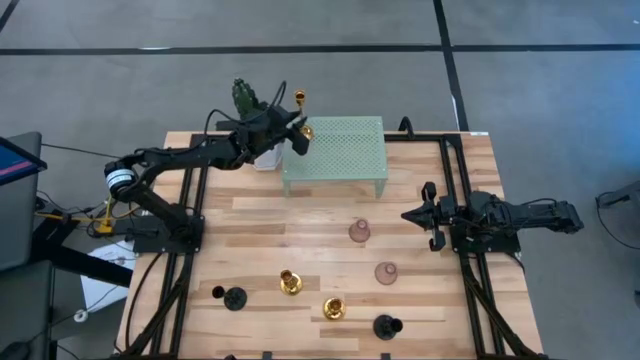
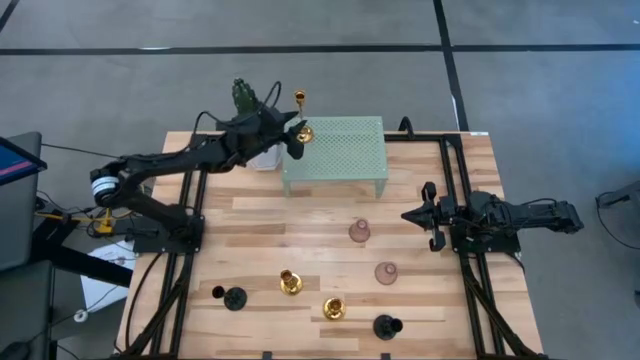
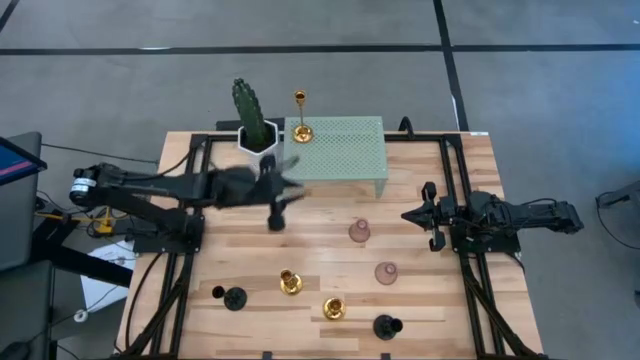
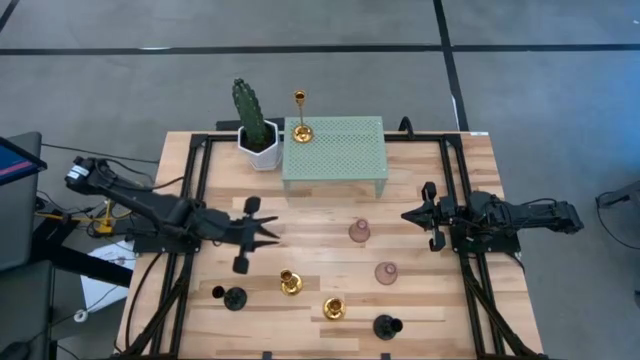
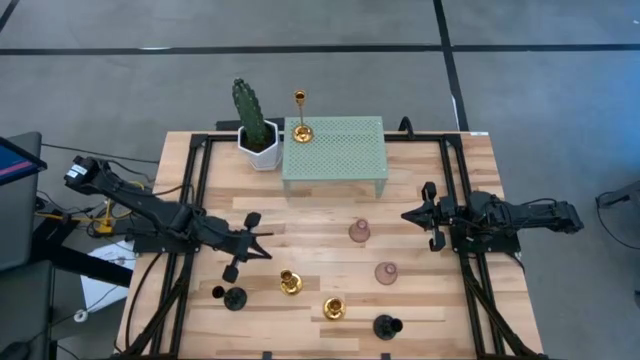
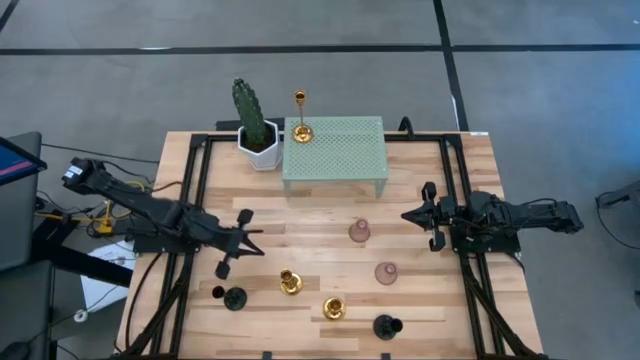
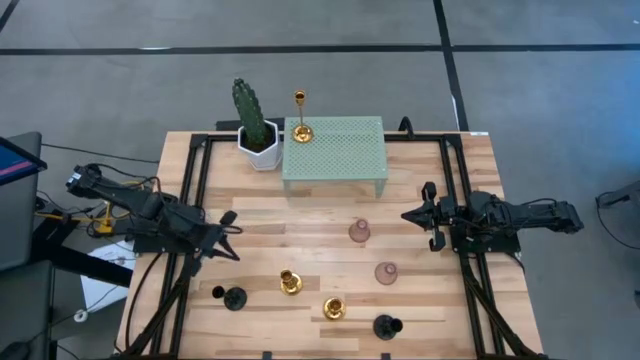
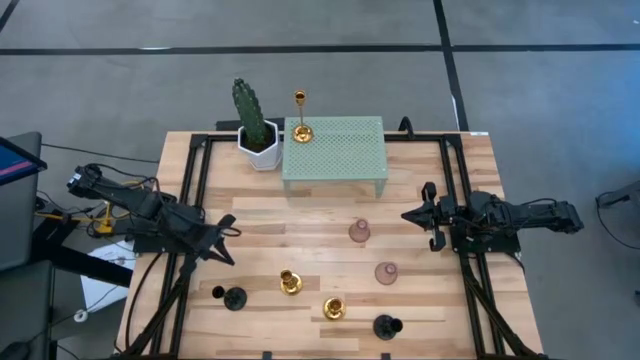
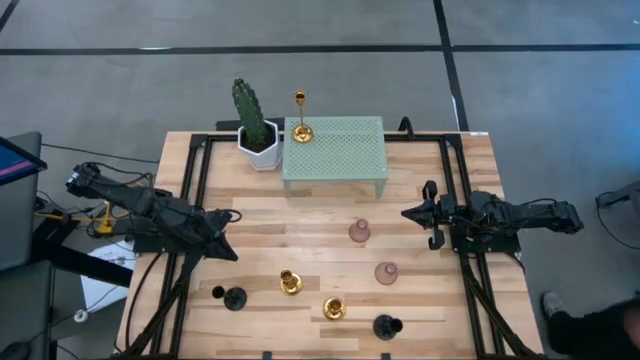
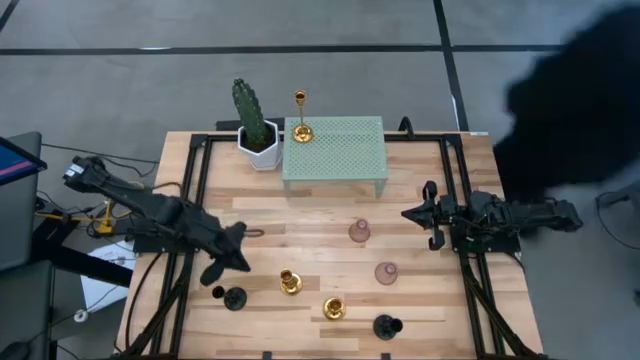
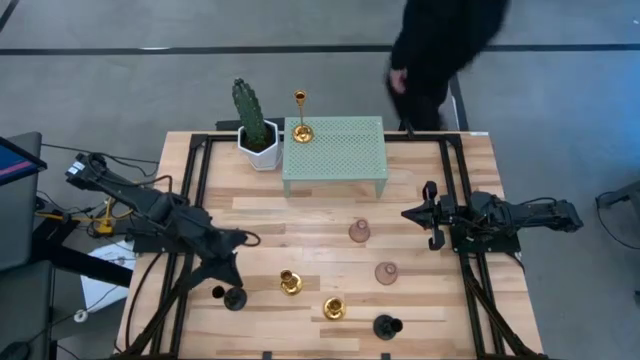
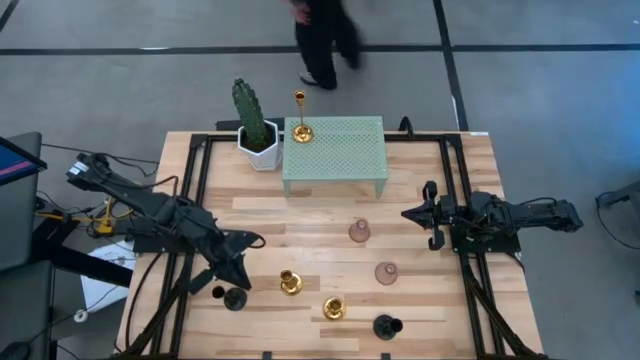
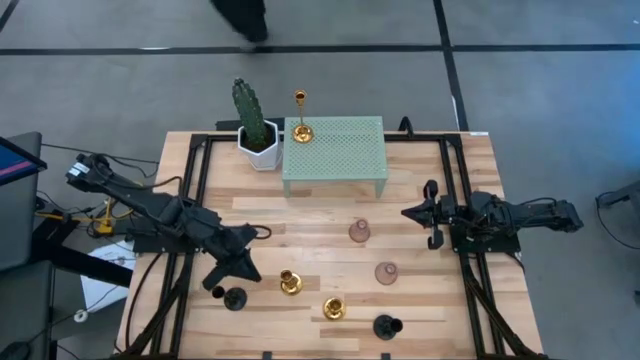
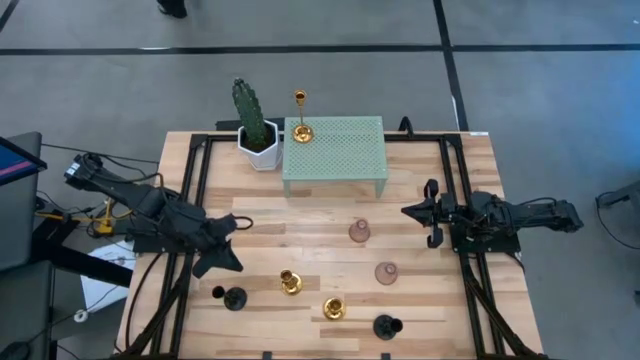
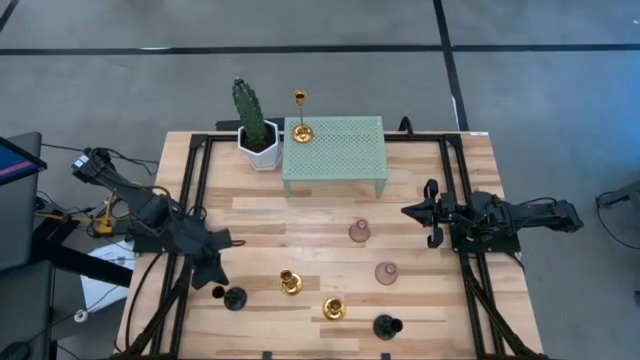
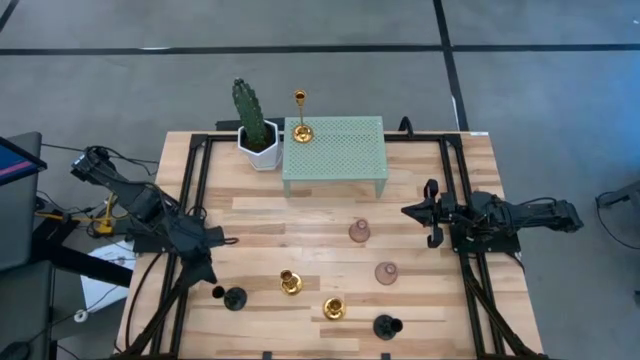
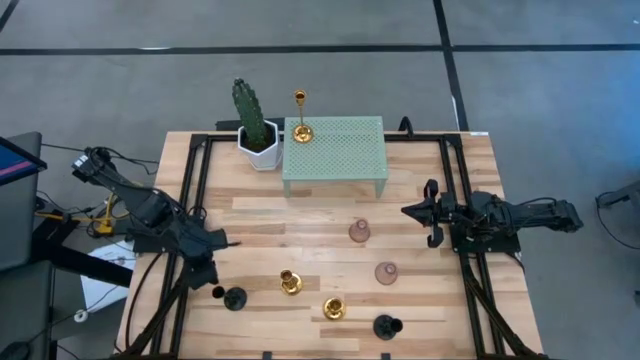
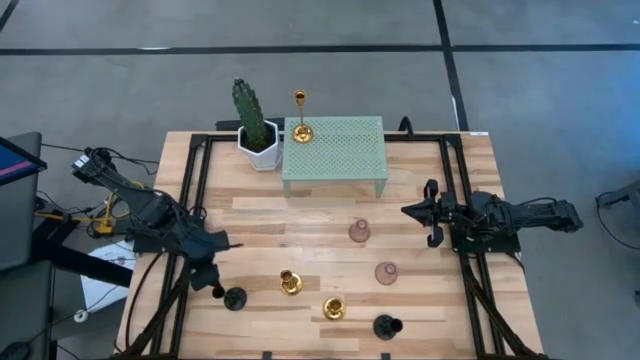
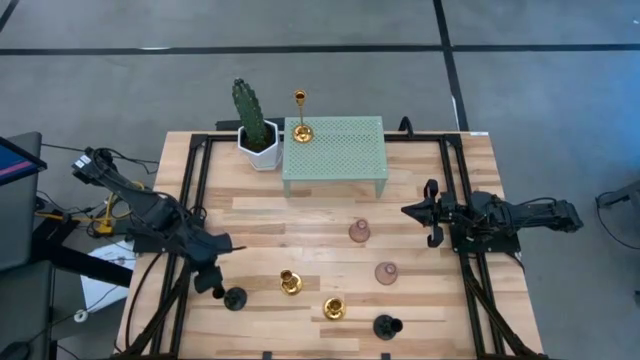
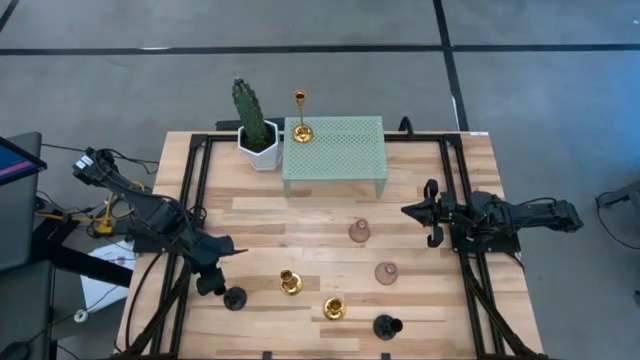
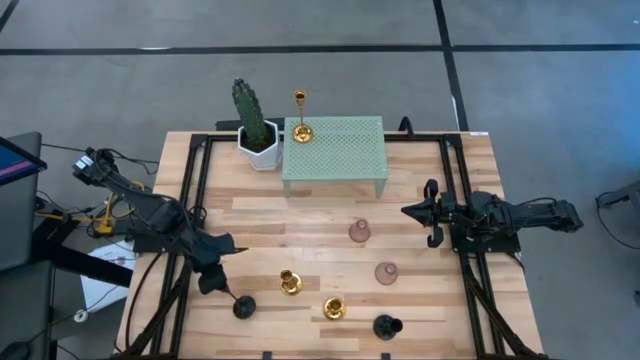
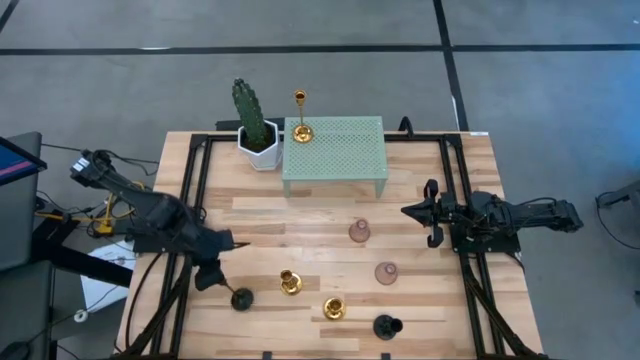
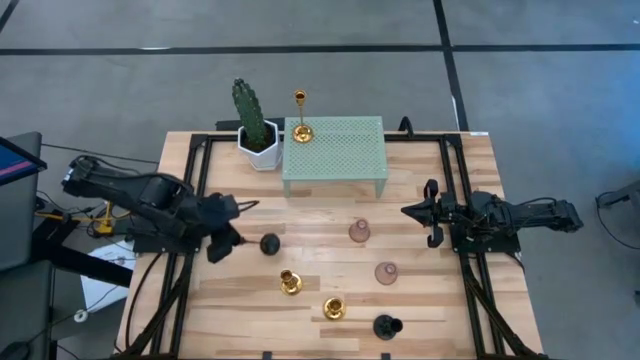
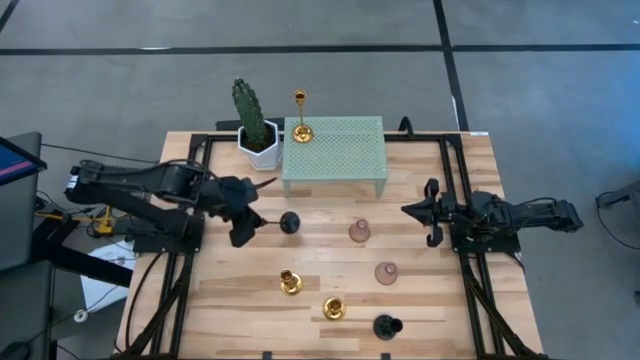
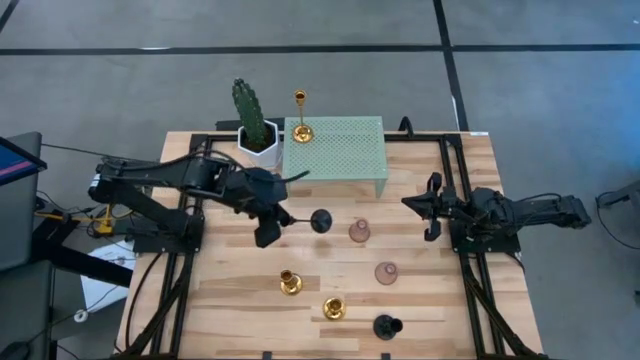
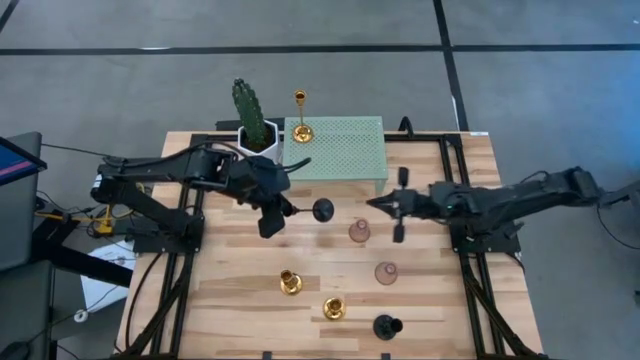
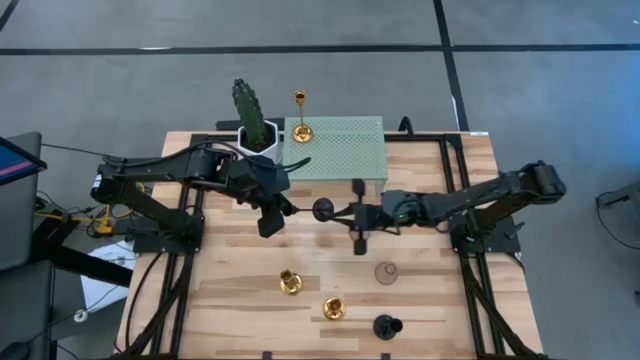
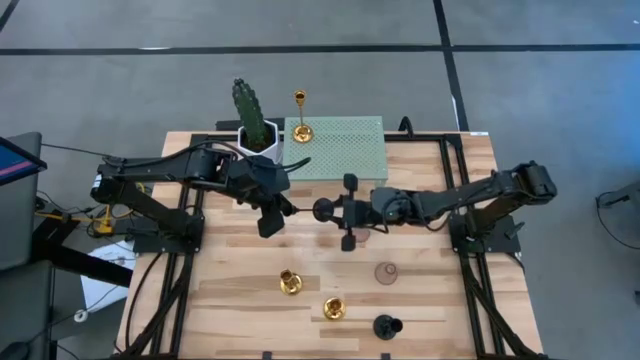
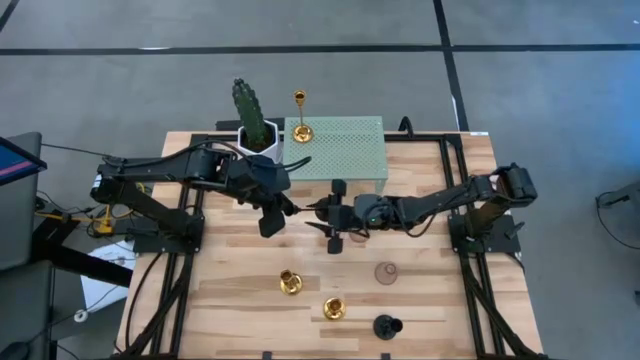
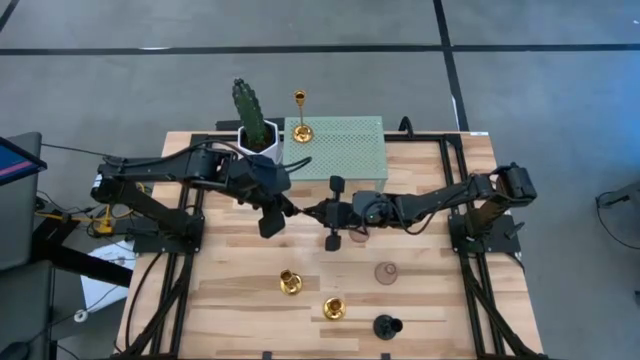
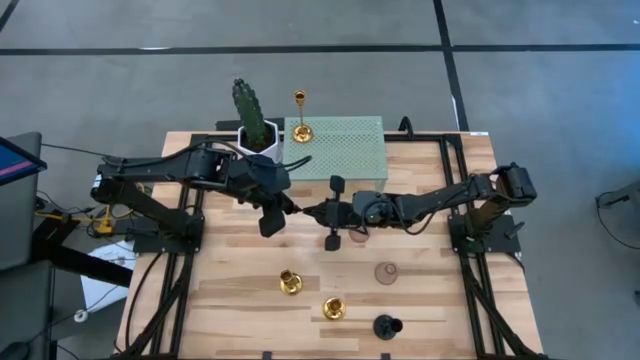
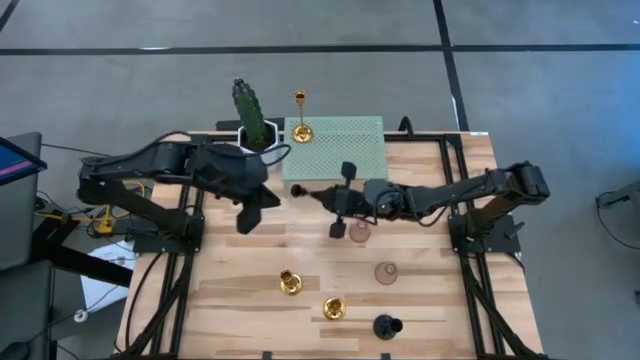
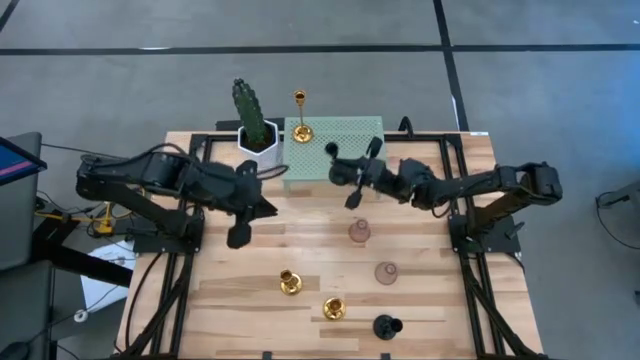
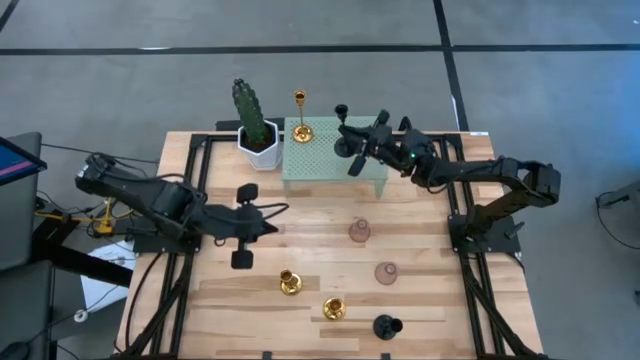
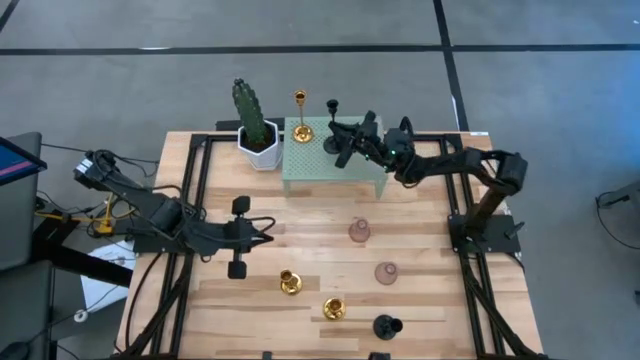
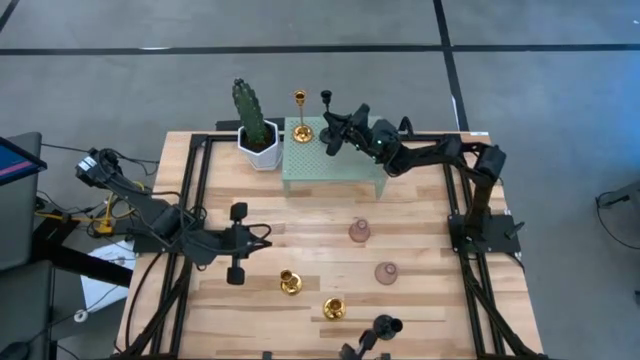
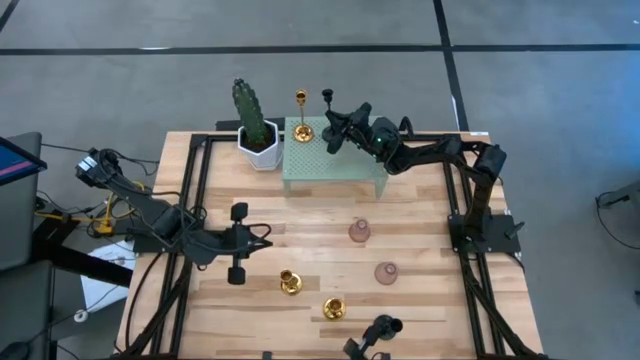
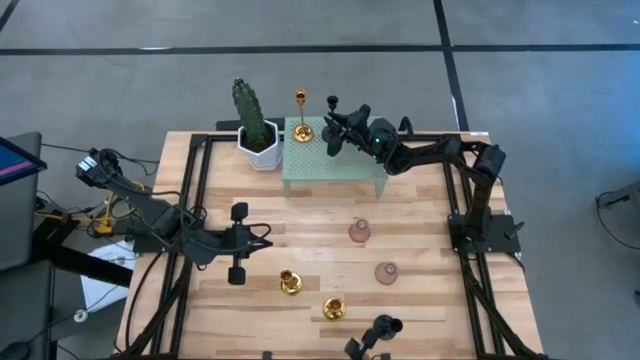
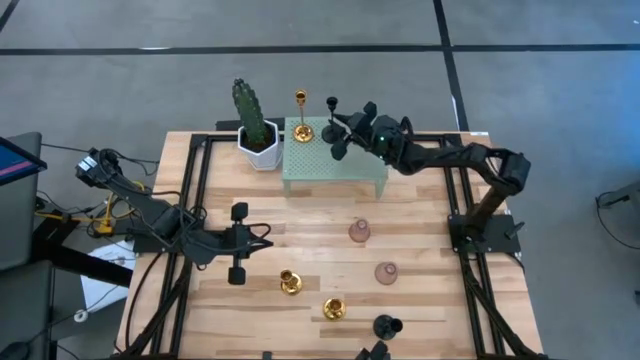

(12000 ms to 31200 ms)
Task: Pick & Place candle stick holders
Put the left black candle holder on the shelf
